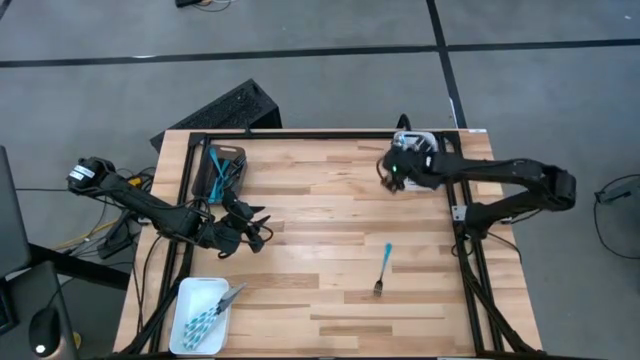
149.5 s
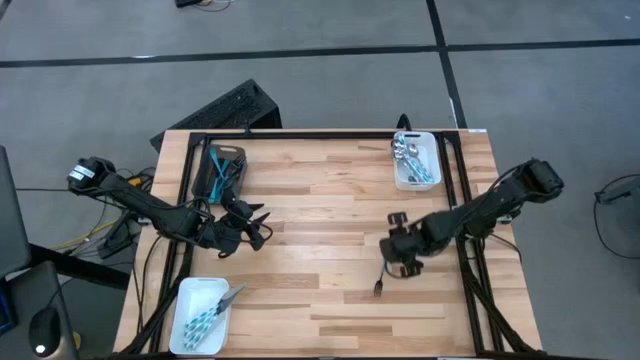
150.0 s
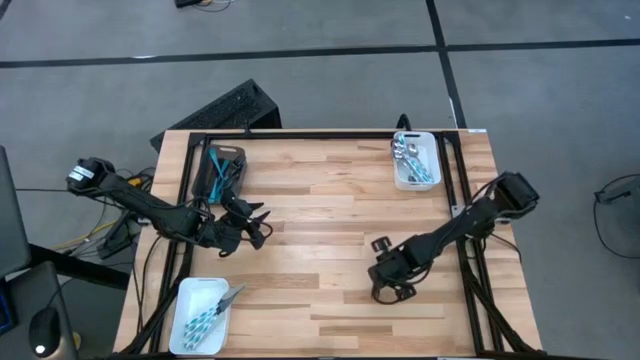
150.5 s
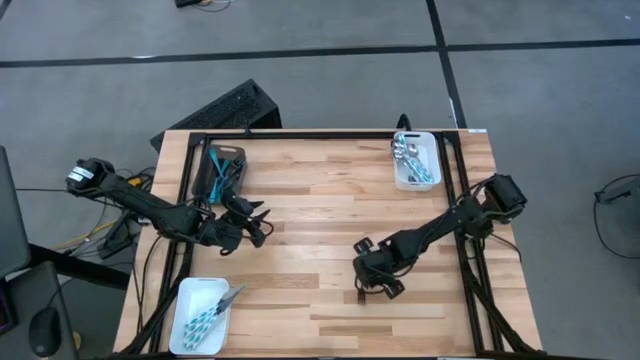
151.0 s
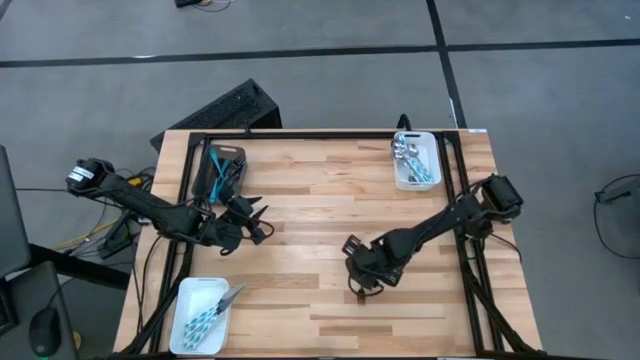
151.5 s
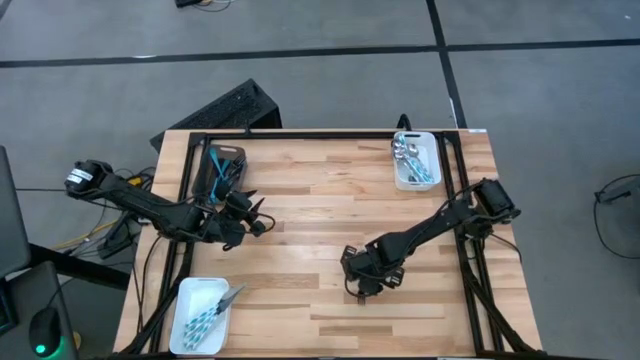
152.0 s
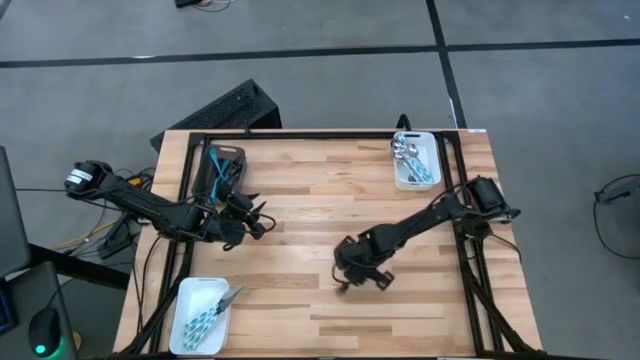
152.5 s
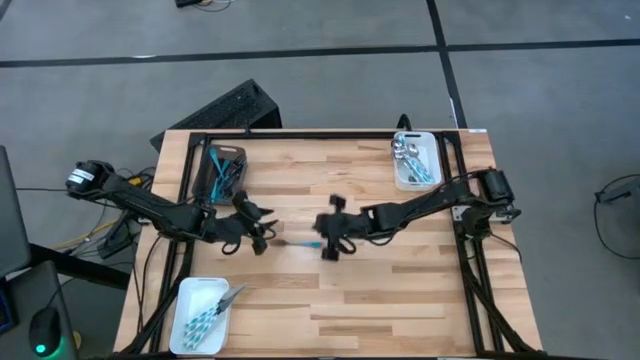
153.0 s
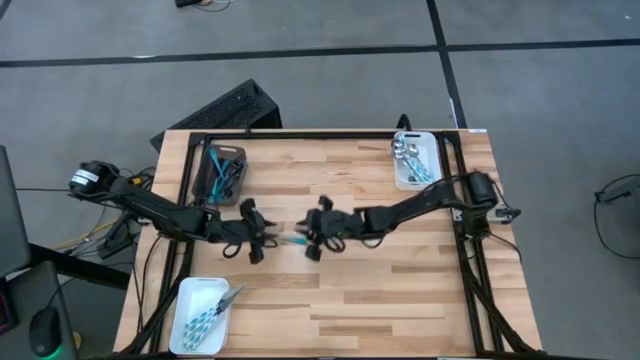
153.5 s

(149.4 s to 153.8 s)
Task: Sort silverware by color (type)
Put the blue fork into the black bin

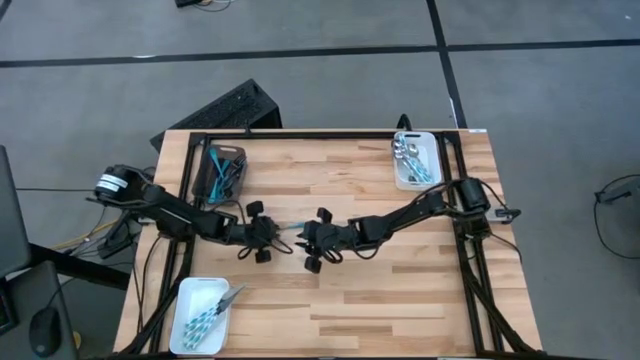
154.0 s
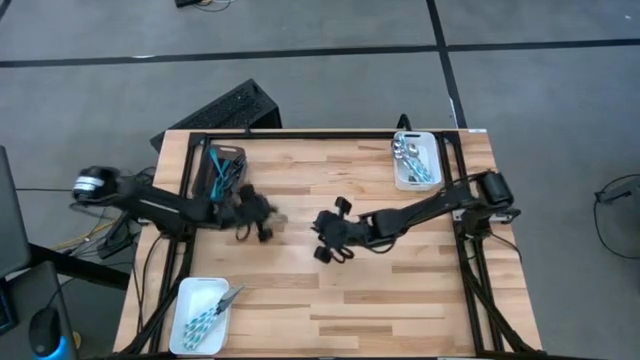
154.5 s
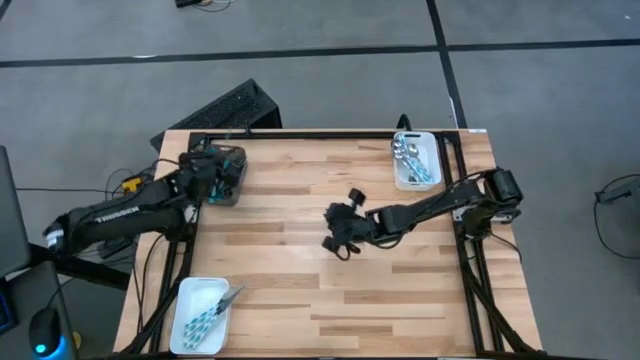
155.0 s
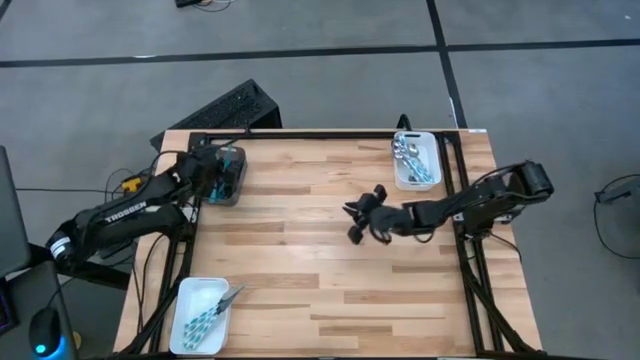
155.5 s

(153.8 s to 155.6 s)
Put the blue fork into the black bin

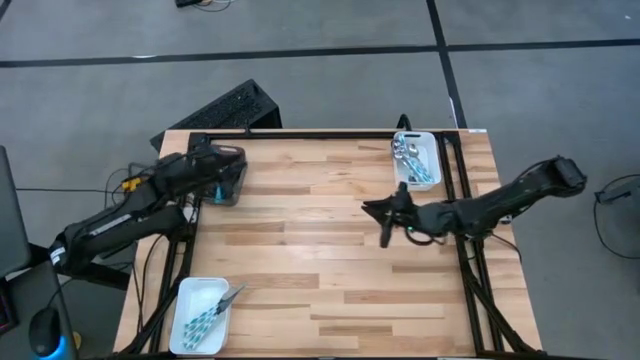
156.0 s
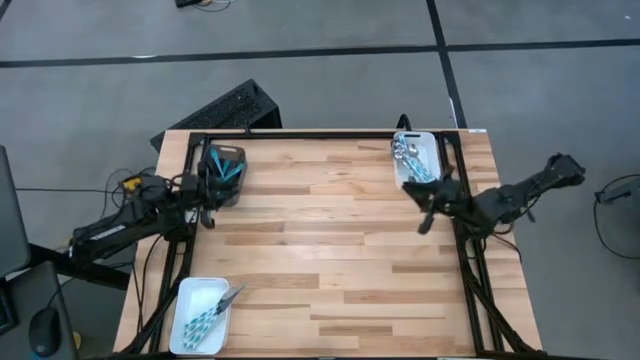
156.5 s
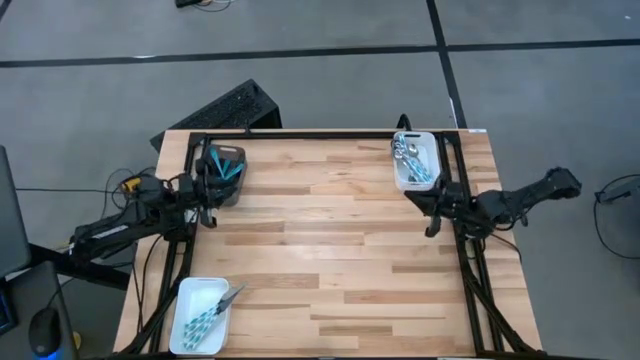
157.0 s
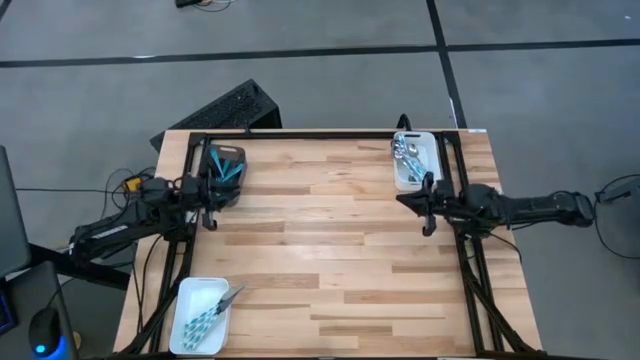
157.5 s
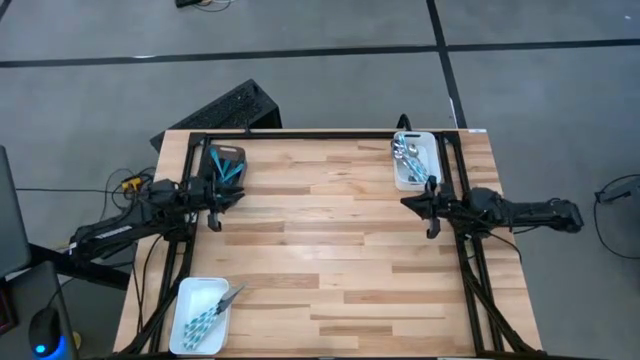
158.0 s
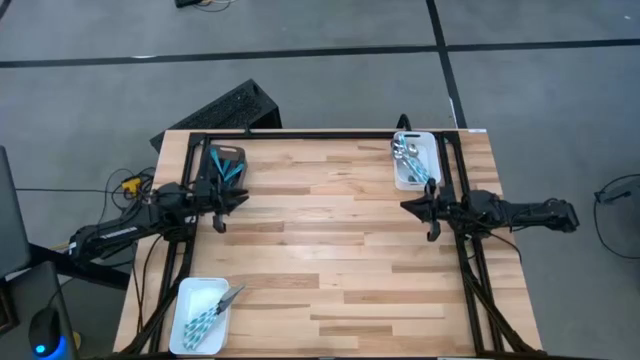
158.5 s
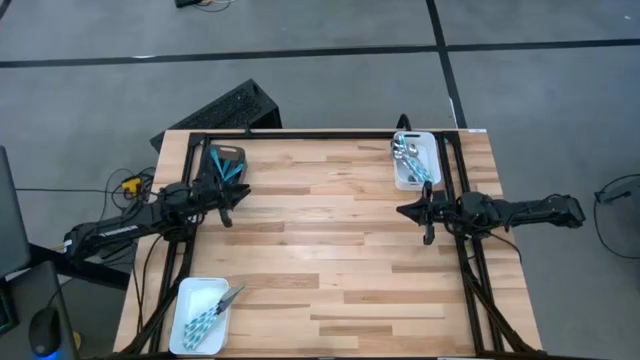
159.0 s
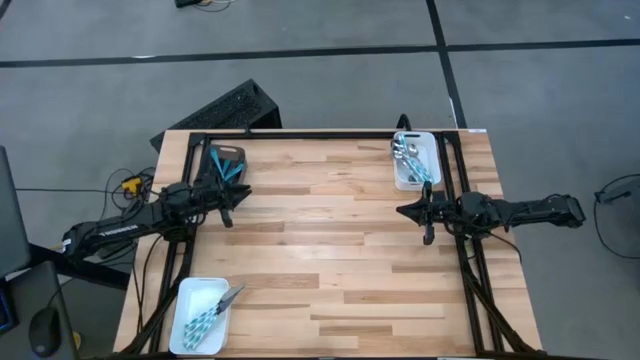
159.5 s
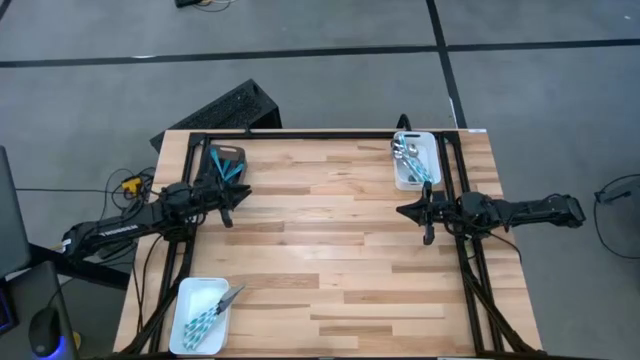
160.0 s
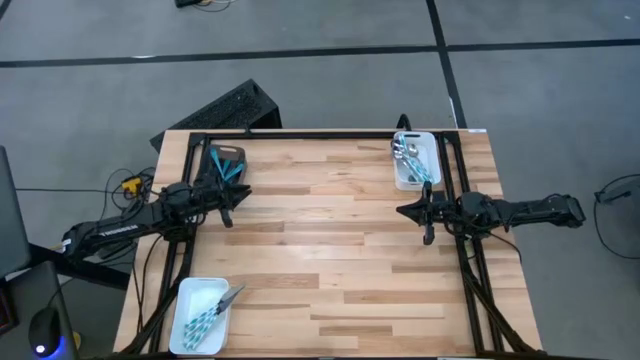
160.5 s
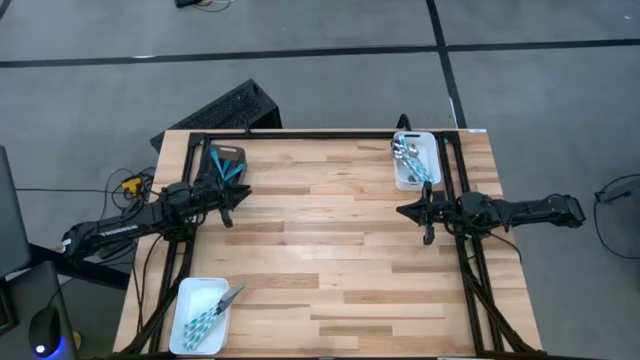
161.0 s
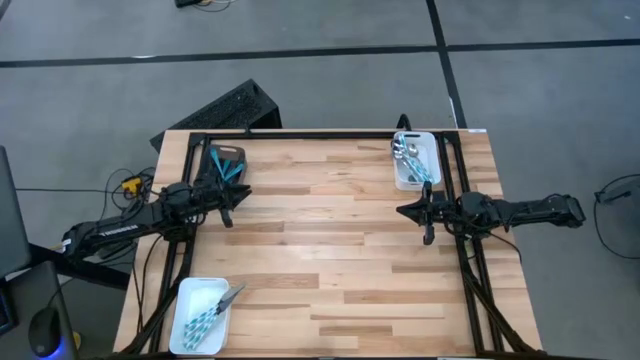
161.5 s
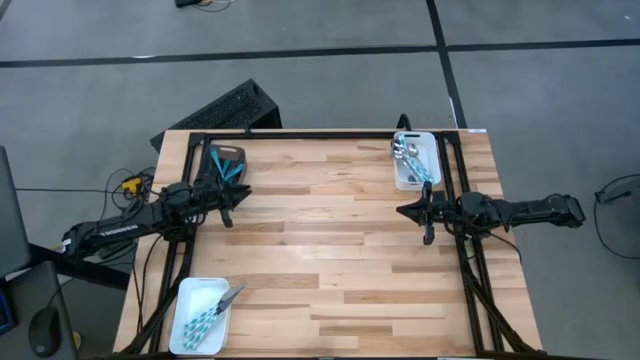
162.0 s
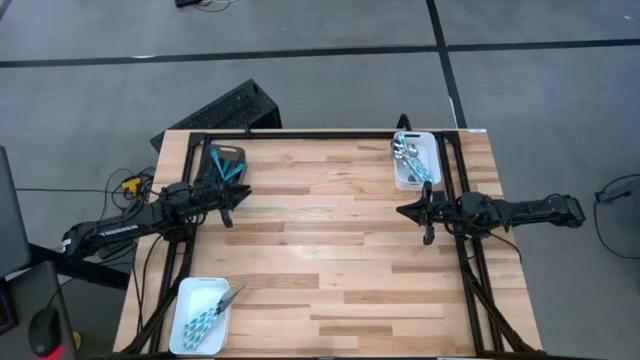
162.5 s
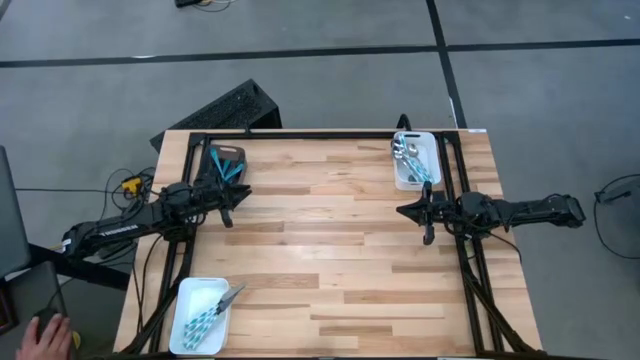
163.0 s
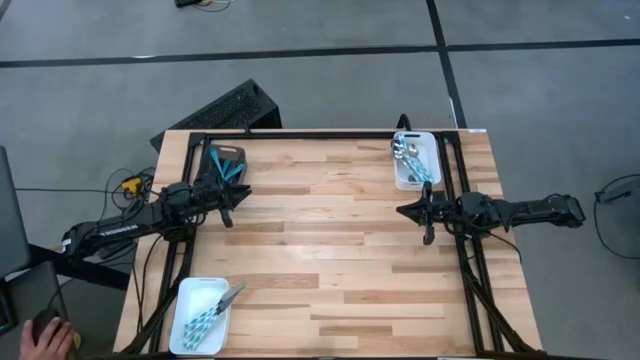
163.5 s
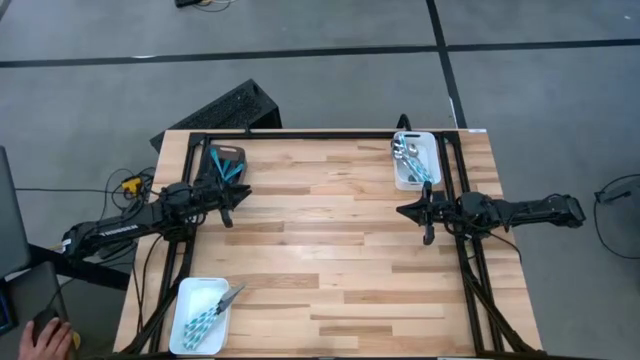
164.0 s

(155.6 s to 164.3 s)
Return to Home Position

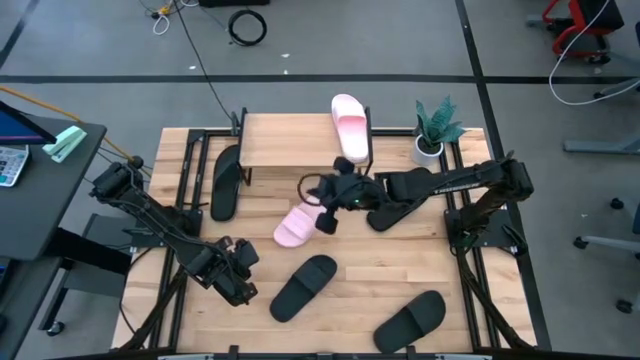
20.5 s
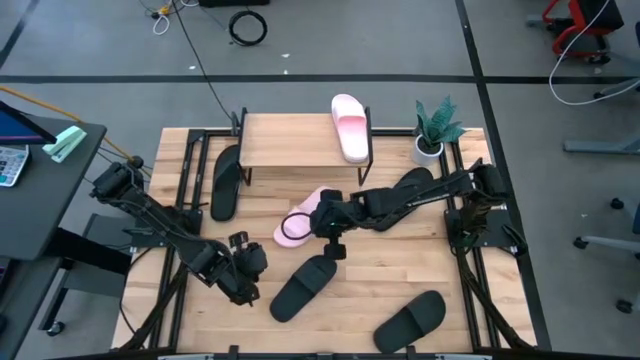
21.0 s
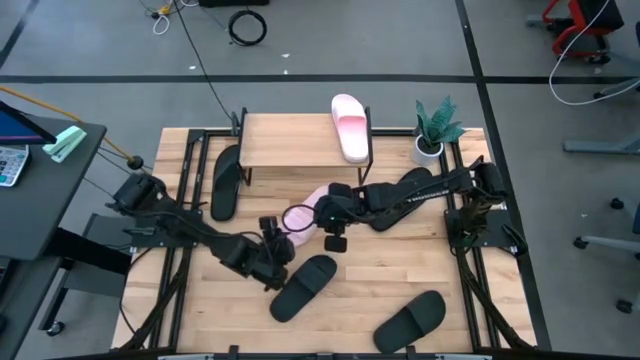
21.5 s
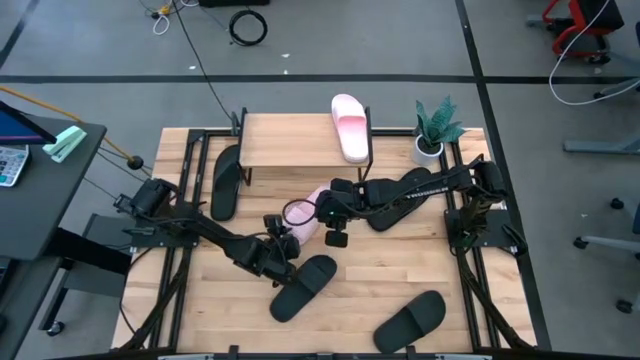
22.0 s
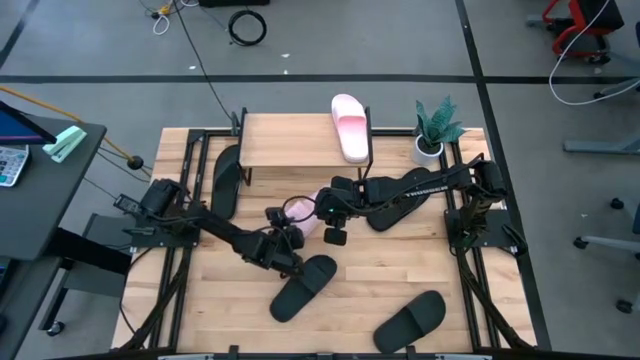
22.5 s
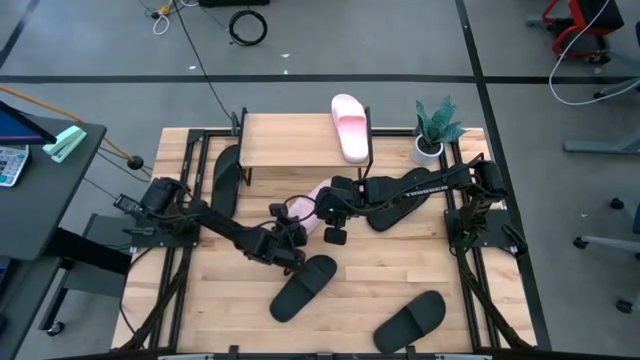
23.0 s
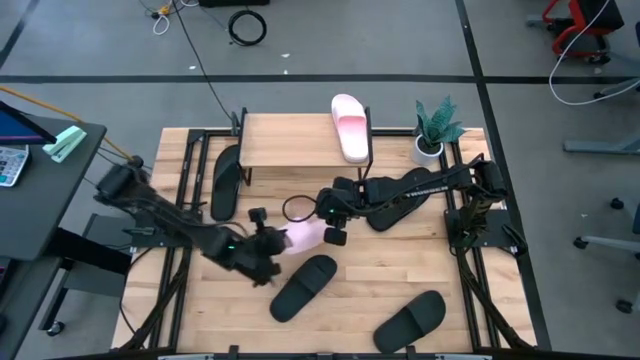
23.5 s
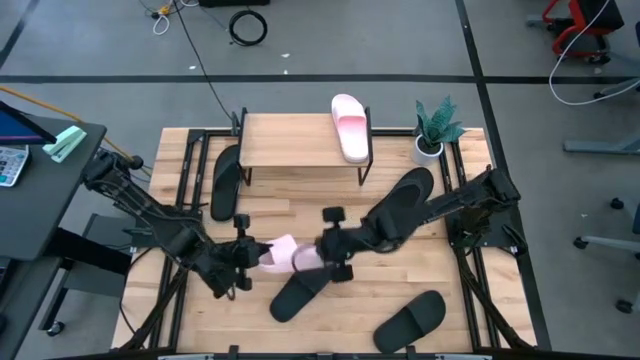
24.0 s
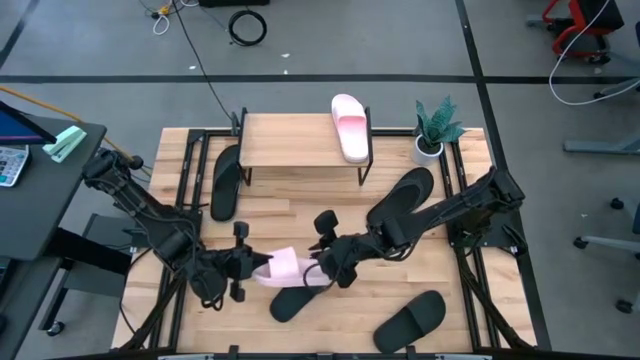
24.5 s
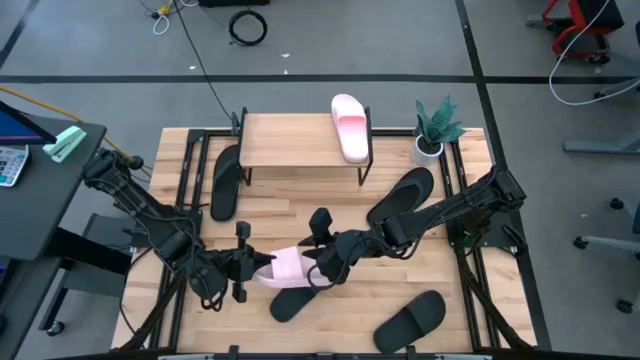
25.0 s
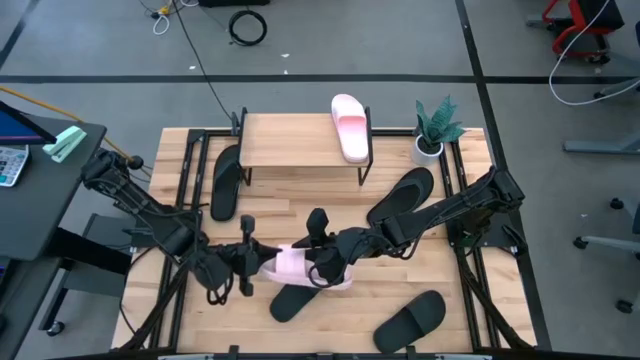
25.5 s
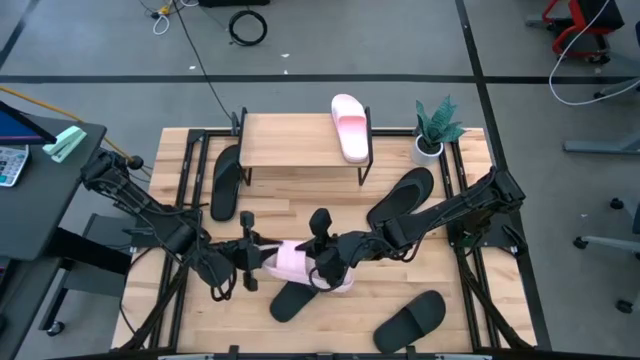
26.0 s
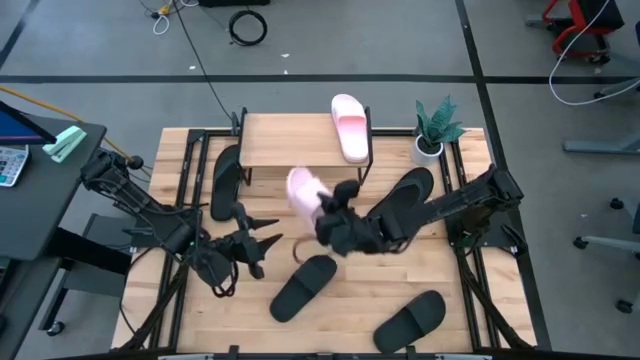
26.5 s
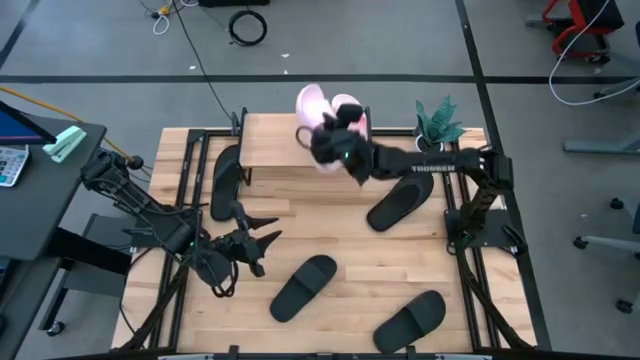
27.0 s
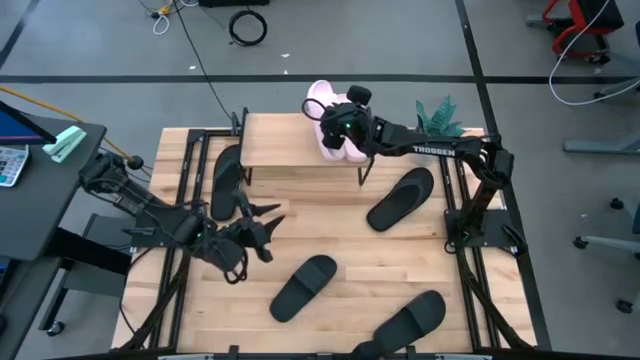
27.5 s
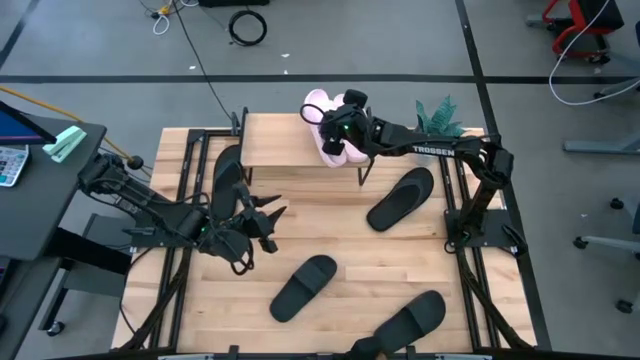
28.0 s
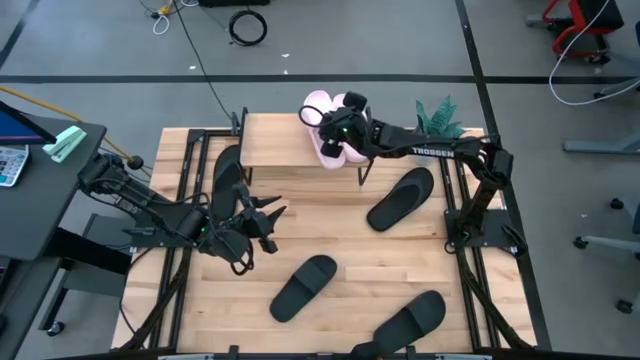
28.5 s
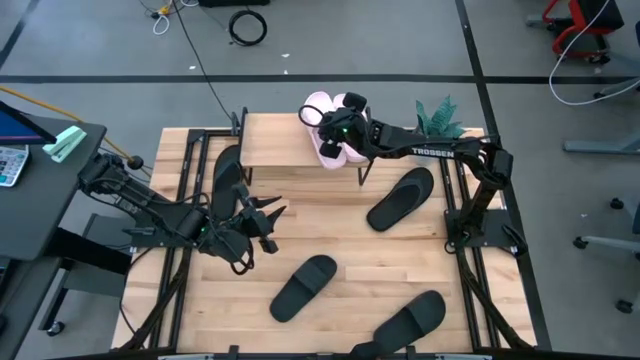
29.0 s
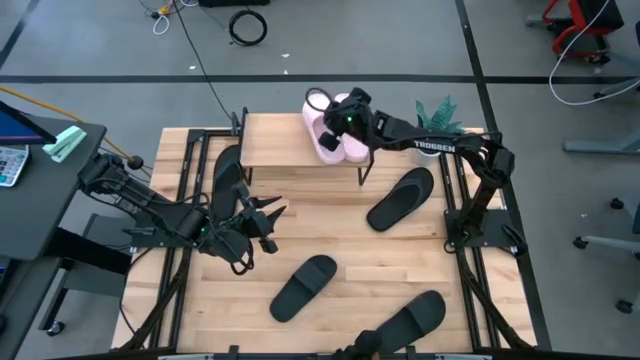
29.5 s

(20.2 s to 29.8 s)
Task: Pick and place slides into the shelf
Align the pink slide on the shelf with the other pink slide
